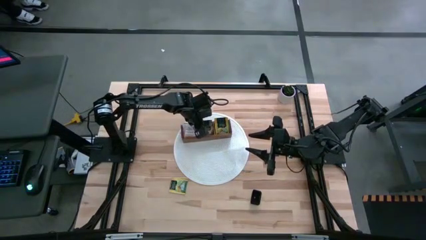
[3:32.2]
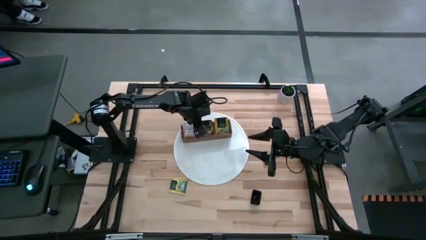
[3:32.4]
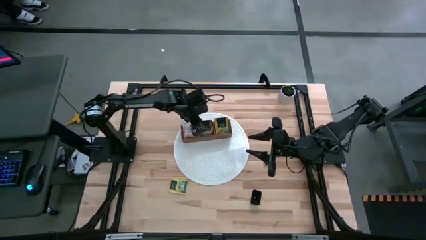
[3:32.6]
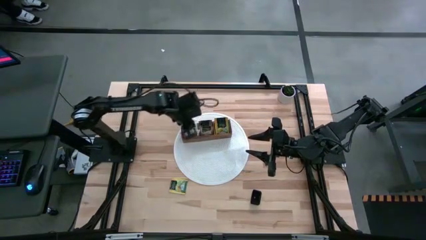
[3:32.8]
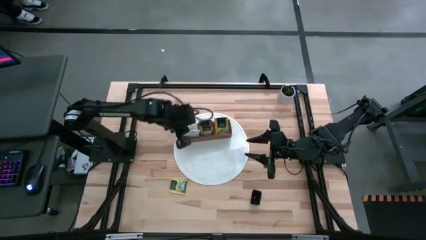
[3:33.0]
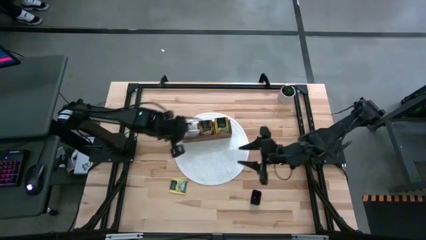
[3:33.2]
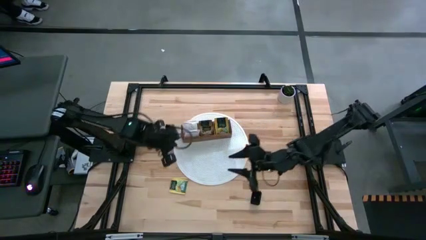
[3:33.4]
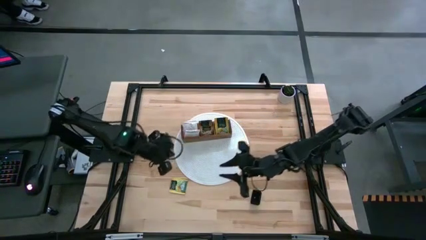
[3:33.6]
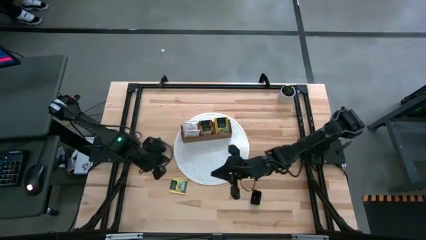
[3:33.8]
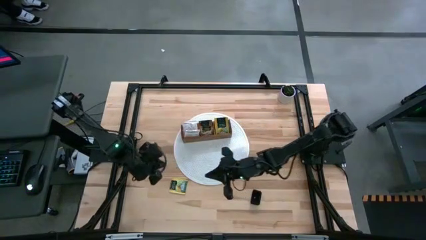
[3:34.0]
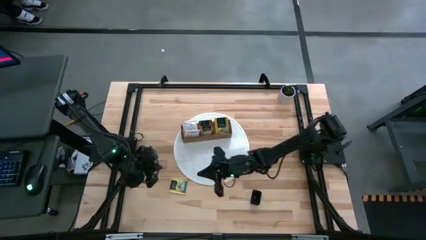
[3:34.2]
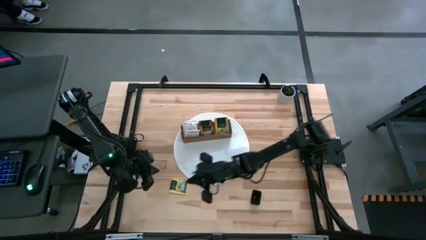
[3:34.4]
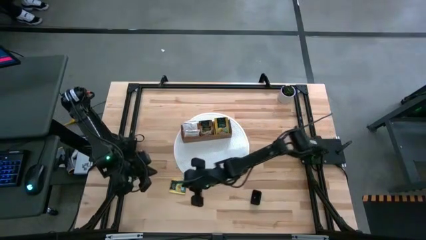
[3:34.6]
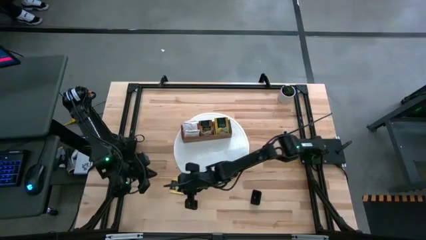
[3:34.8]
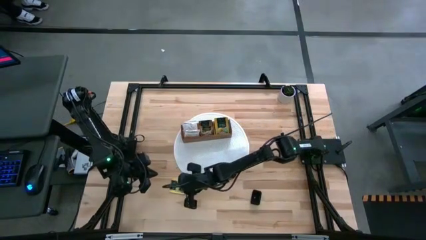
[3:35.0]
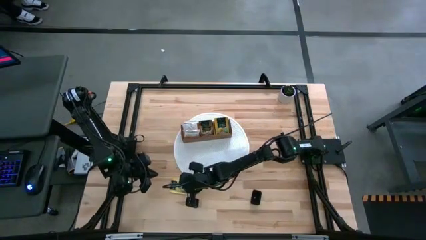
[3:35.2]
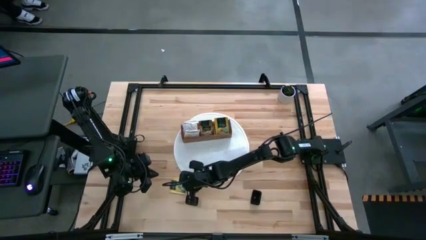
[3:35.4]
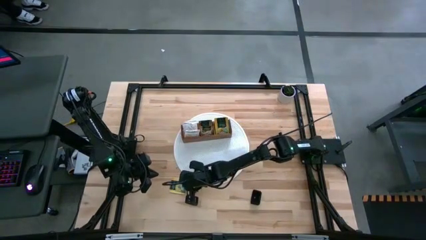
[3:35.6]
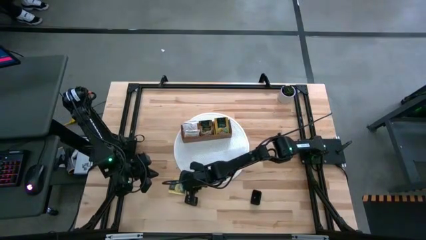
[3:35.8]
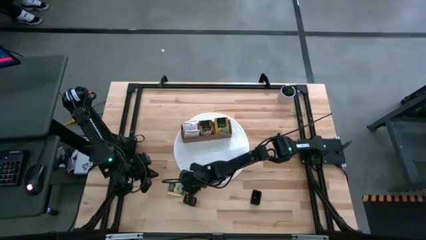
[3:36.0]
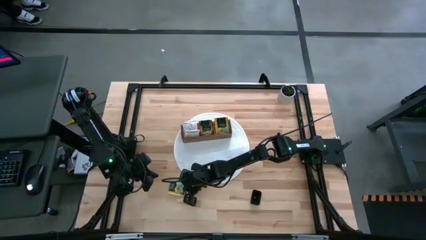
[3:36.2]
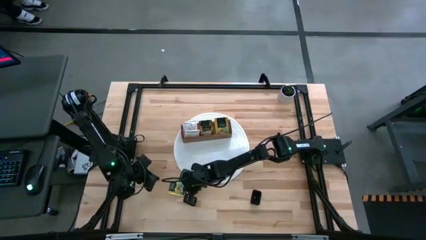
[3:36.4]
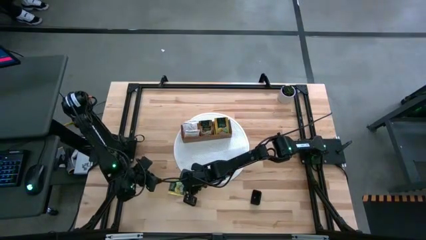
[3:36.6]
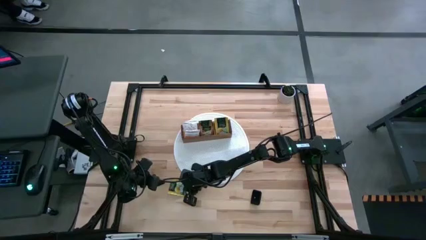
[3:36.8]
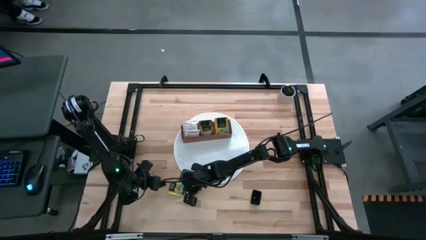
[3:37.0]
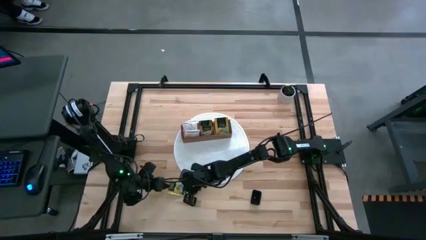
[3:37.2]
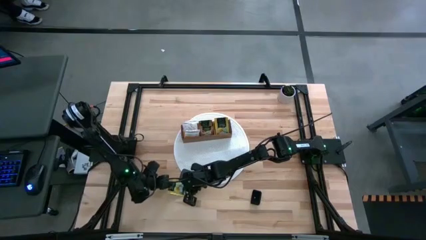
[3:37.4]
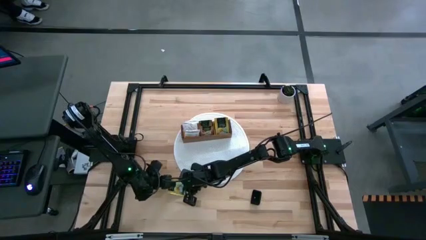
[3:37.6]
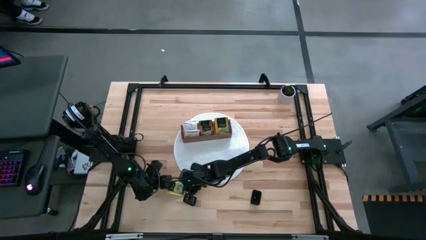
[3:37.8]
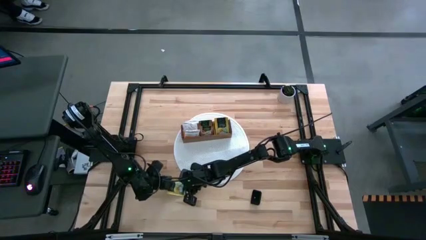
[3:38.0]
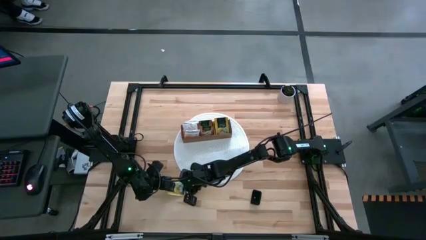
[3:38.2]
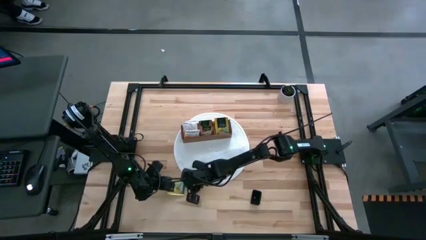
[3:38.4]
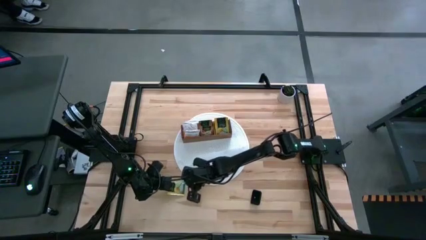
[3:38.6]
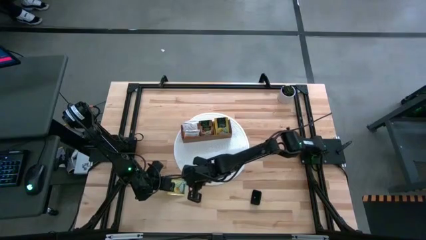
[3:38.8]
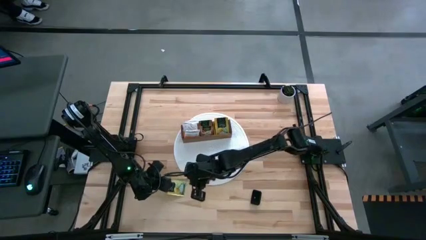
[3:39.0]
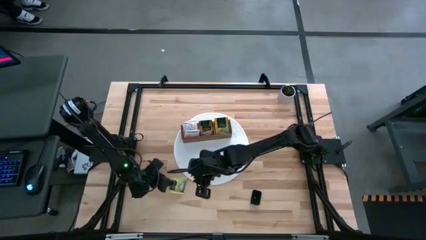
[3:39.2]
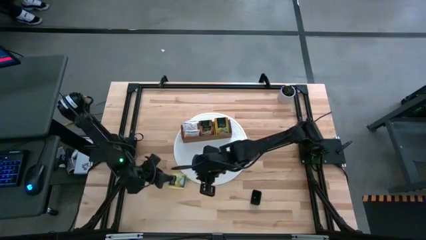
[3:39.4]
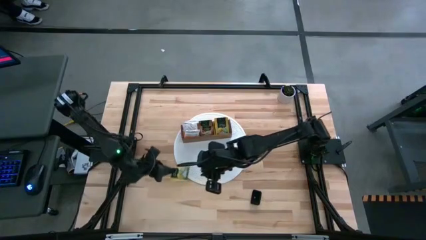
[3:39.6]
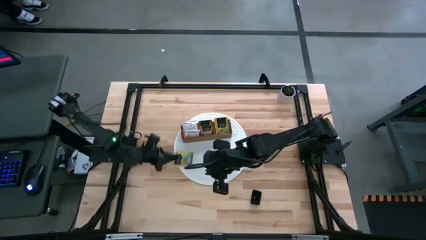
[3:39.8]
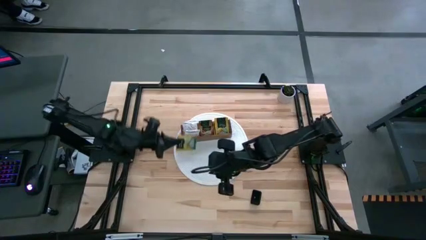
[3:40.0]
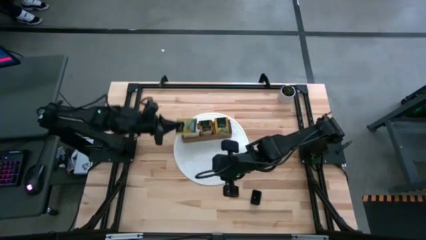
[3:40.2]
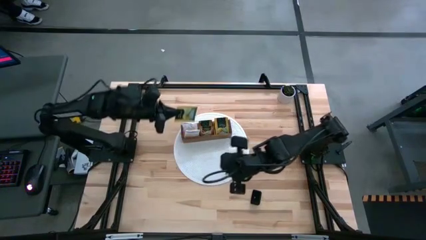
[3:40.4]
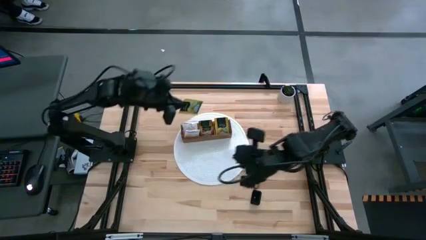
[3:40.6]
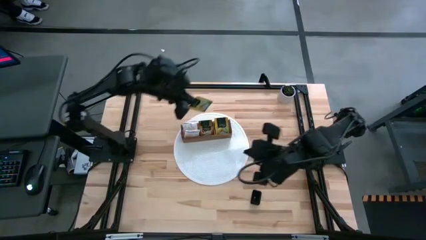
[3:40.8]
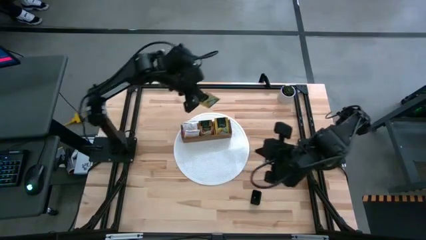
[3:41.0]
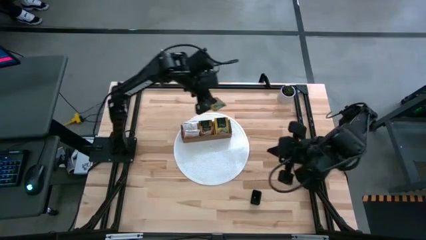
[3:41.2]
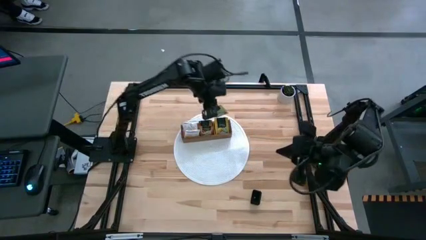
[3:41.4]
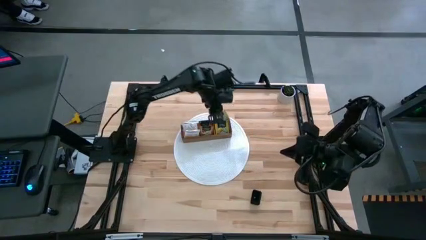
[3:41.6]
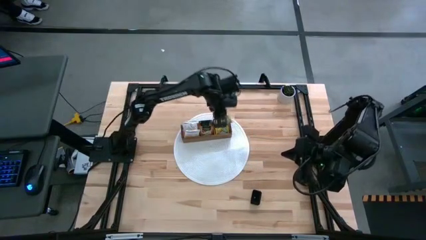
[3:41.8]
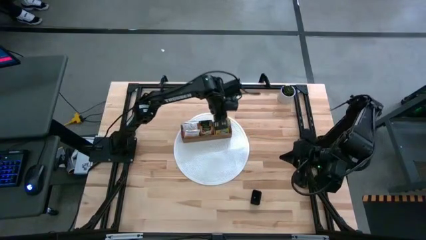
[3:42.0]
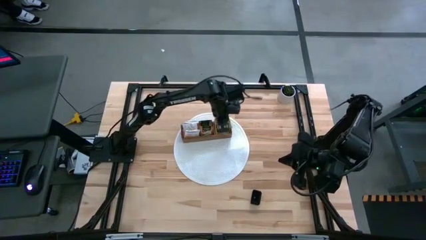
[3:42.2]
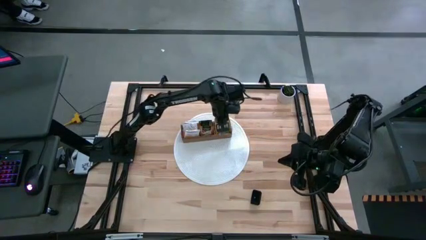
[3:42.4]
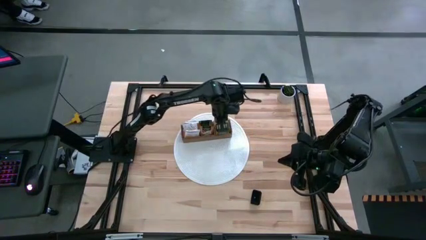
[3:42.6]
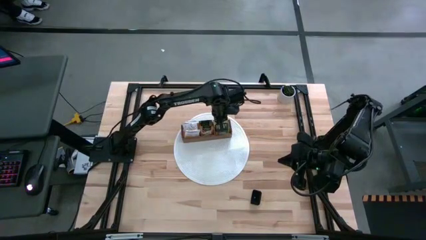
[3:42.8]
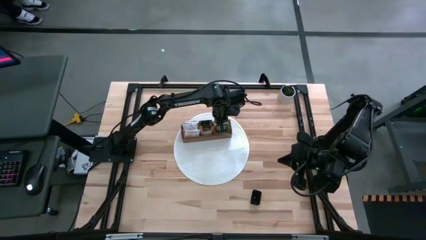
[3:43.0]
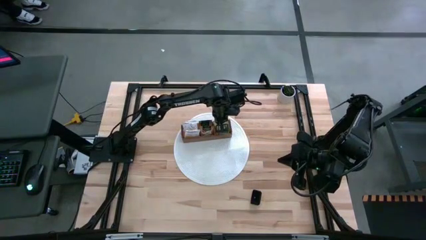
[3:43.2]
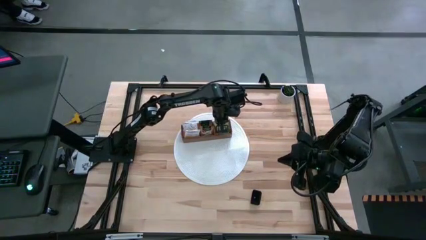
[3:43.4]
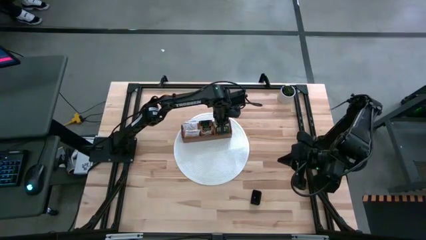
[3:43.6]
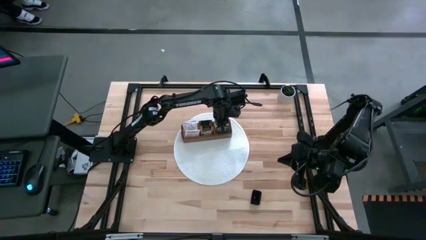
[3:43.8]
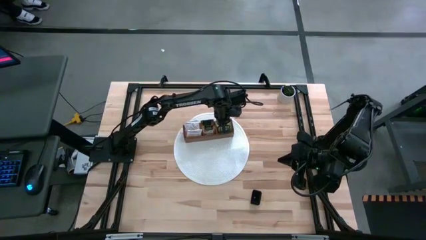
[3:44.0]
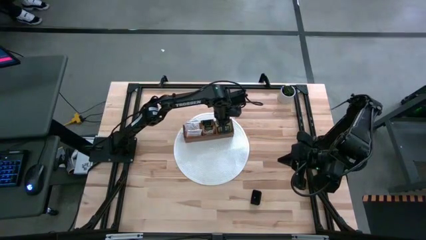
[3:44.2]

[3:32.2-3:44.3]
Task: Pick & Place Tea
Put the yellow tea bag into the right section of the wooden organizer

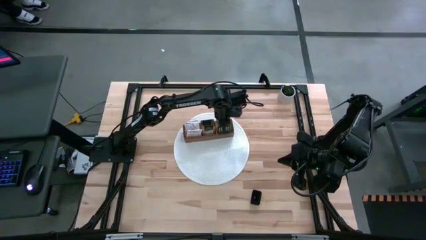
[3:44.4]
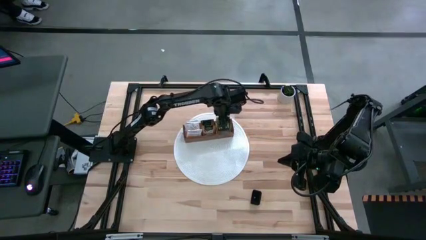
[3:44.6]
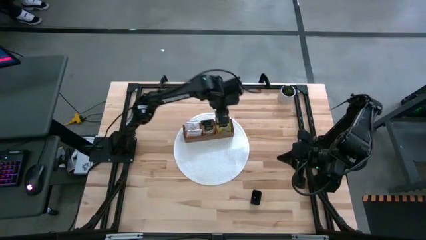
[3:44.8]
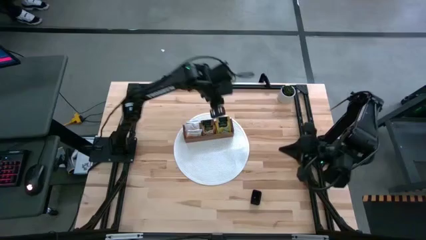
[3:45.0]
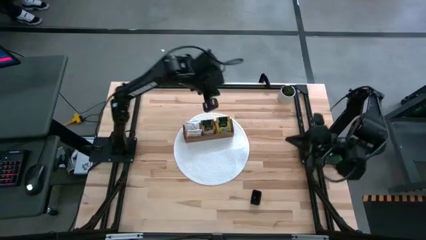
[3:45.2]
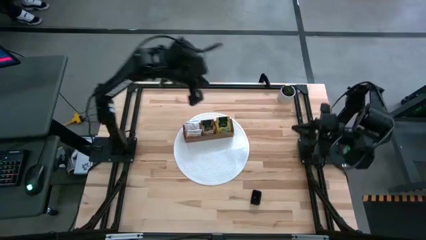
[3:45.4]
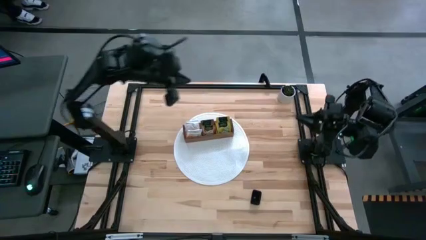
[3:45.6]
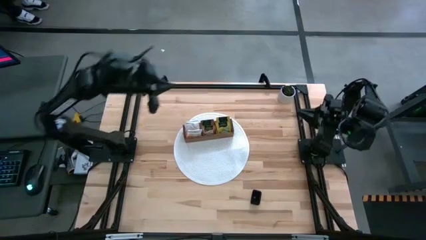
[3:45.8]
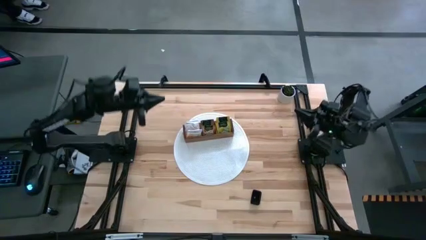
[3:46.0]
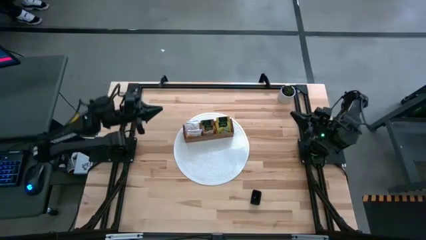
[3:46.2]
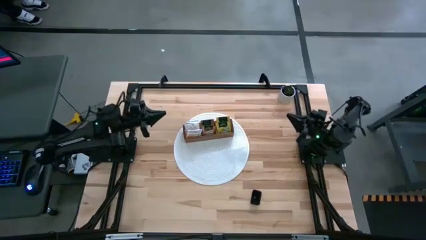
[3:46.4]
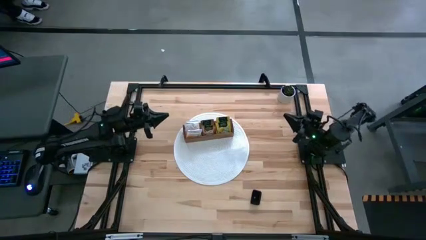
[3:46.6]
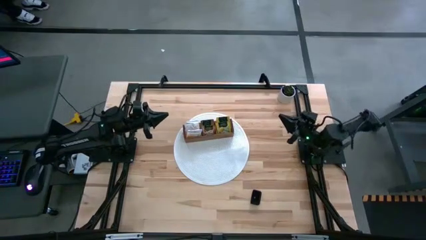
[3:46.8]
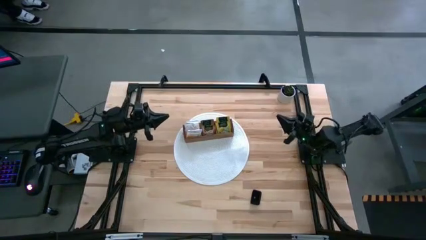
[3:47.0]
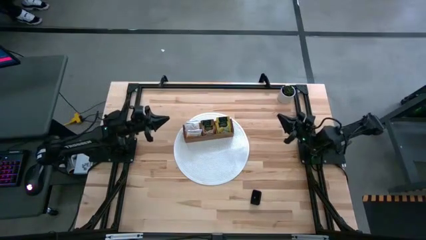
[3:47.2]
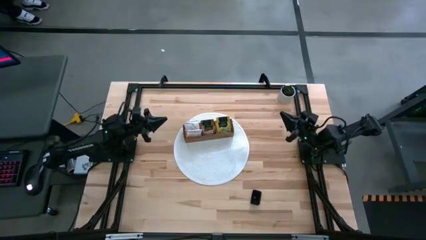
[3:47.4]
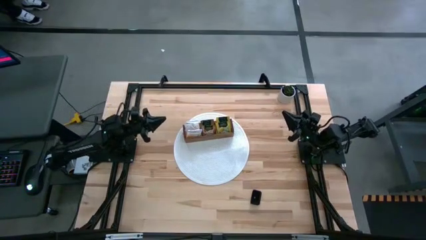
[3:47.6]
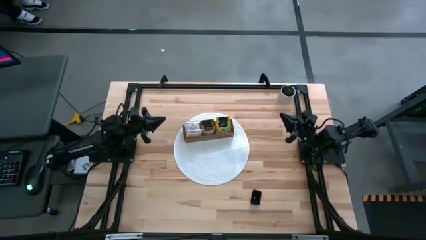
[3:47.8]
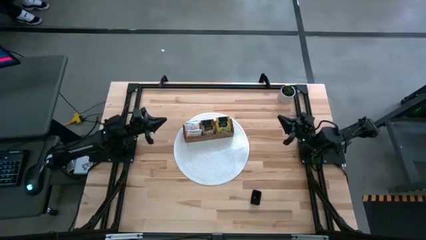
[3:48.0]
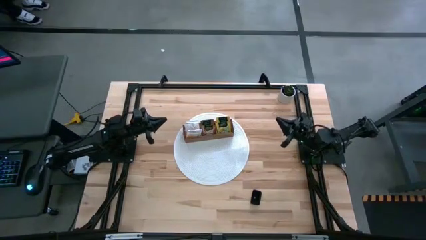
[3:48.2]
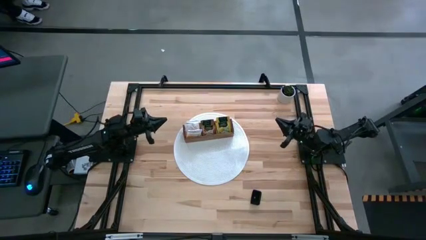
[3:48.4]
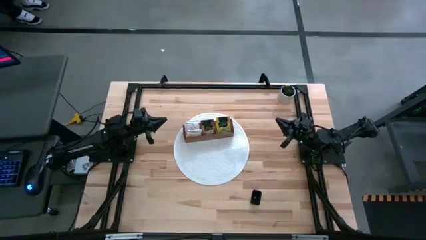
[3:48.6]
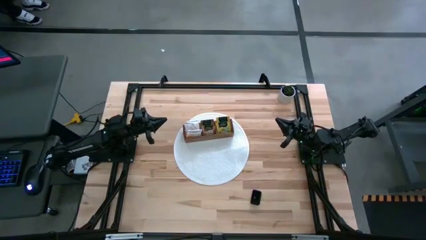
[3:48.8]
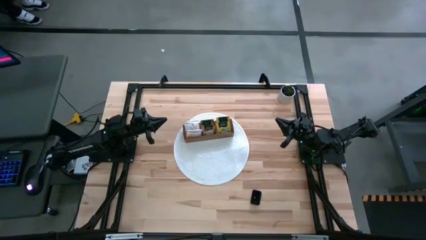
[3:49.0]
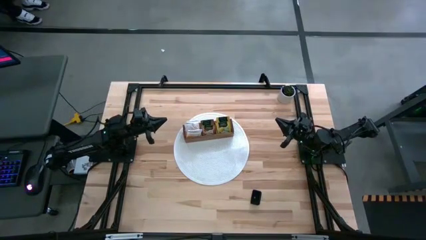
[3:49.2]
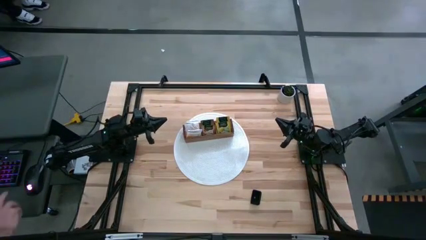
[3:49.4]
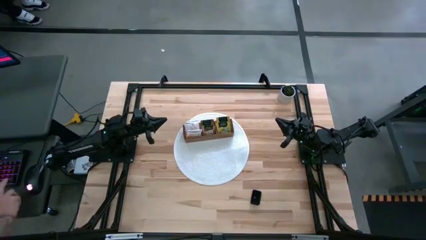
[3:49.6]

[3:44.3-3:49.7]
Return to Home Position
